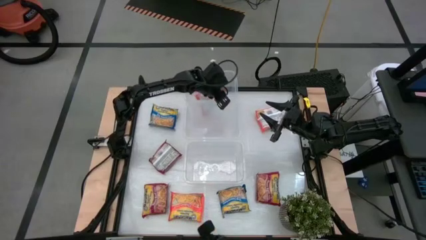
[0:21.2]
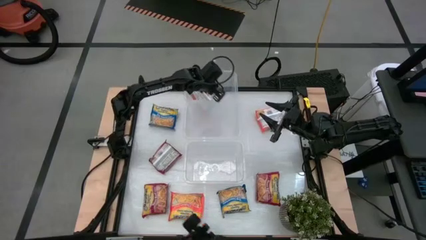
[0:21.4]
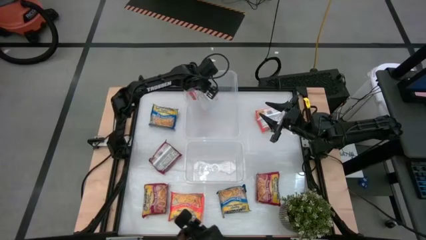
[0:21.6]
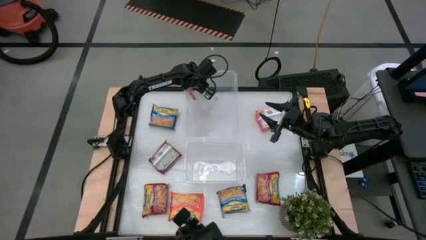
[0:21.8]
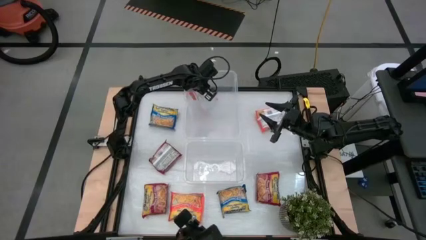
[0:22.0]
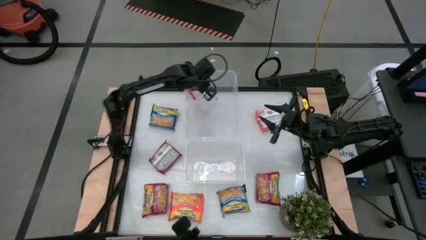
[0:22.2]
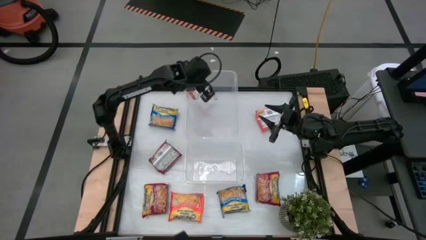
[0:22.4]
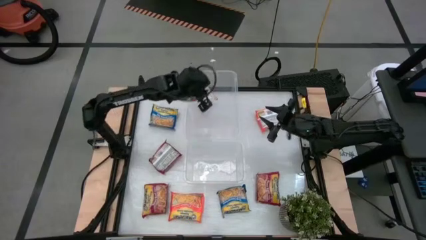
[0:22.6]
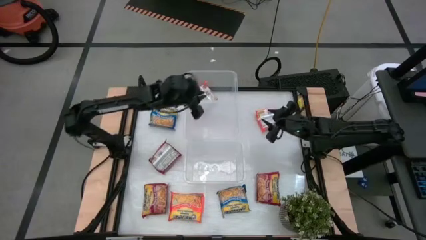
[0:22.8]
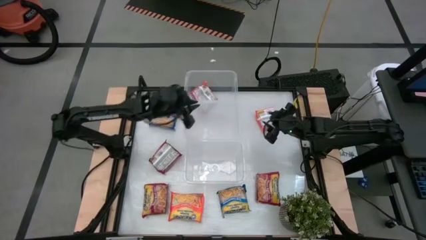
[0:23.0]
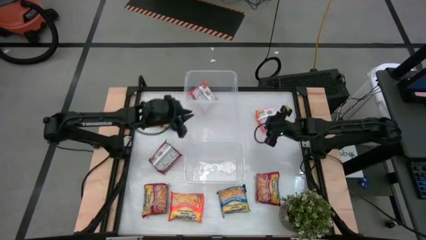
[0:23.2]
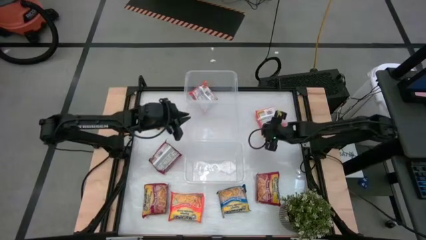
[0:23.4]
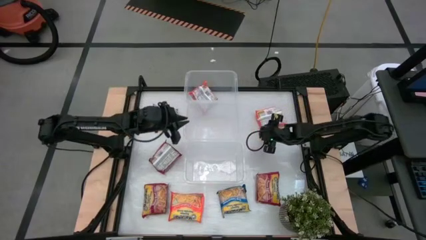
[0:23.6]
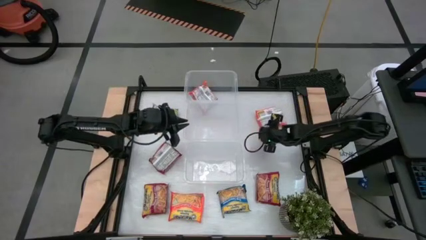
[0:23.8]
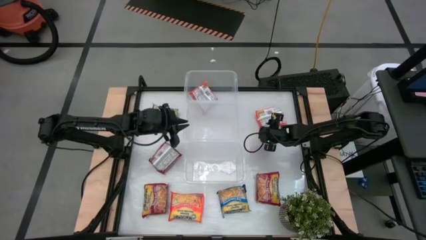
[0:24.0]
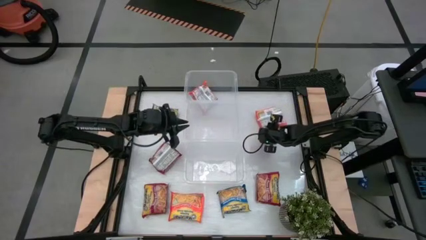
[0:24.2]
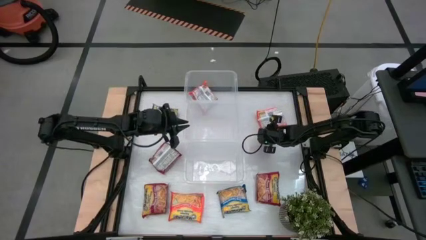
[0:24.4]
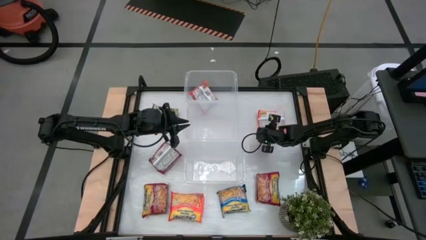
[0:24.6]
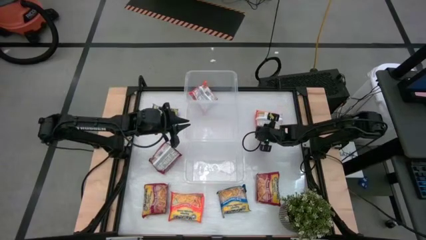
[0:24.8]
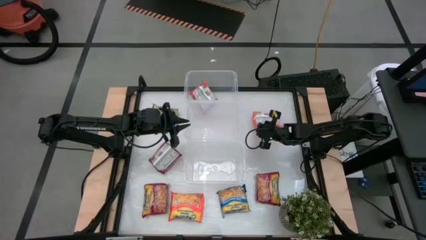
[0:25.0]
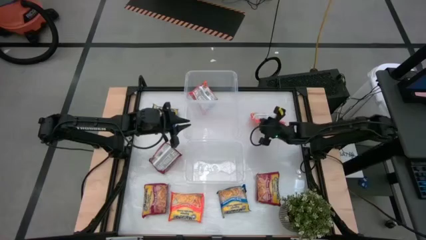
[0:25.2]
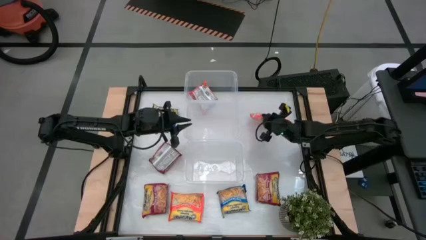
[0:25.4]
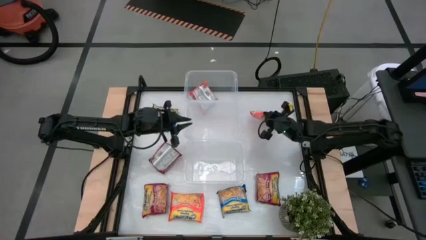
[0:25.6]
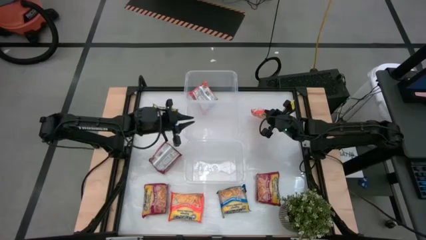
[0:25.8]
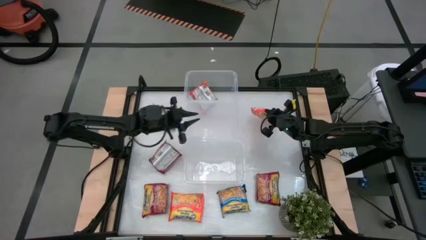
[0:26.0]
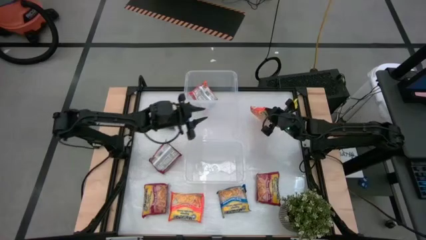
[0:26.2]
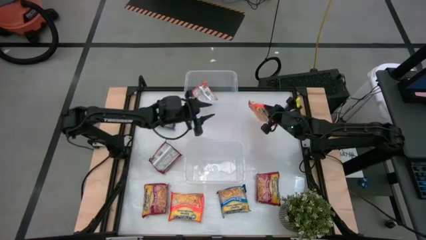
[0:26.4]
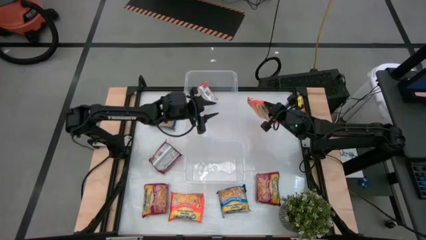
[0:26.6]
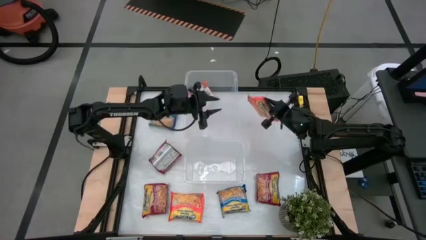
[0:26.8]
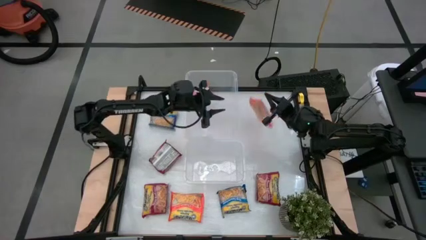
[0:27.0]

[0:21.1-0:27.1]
Task: Sort Maruchan noodles
Put the top orange noodle pack into the top transparent bin

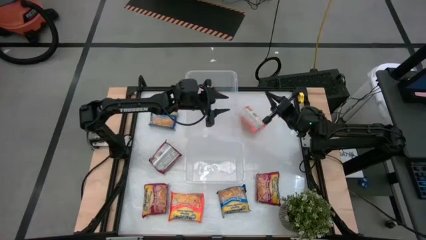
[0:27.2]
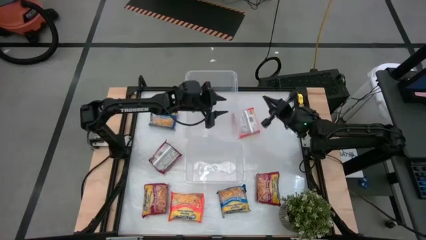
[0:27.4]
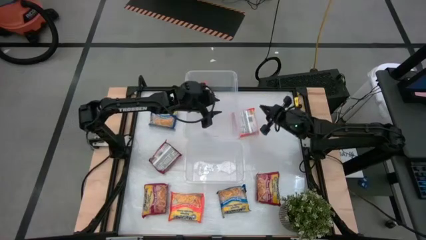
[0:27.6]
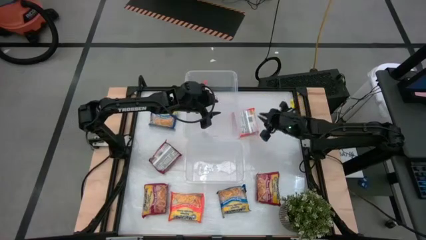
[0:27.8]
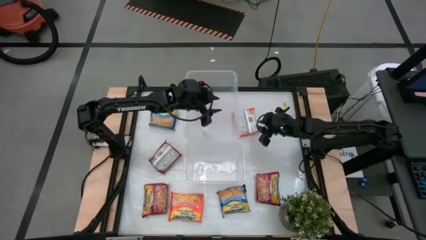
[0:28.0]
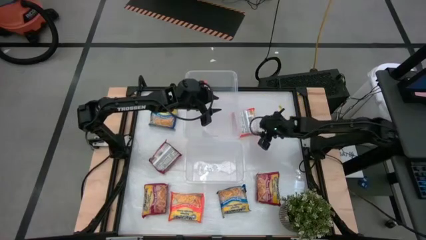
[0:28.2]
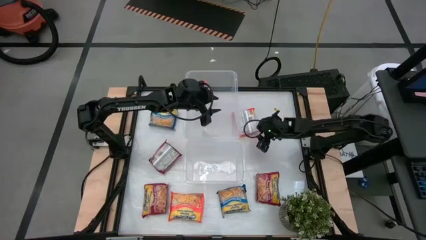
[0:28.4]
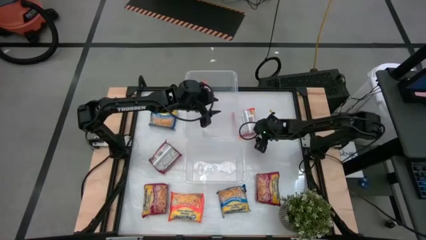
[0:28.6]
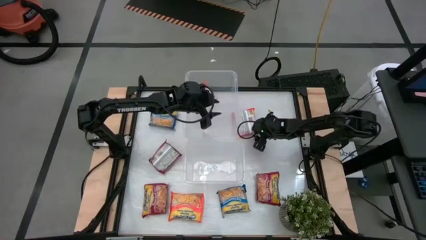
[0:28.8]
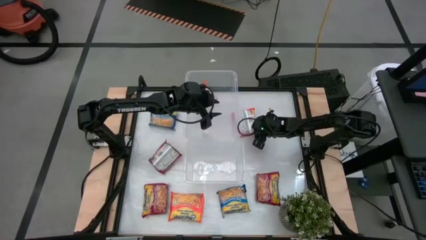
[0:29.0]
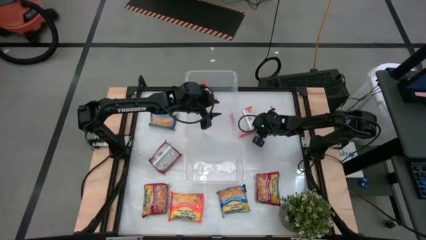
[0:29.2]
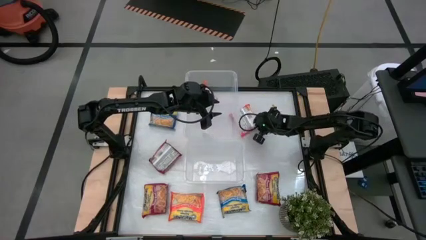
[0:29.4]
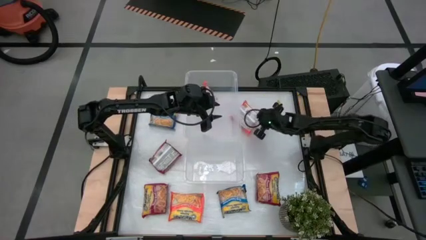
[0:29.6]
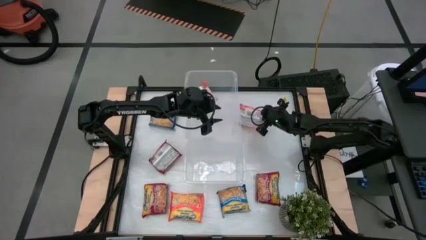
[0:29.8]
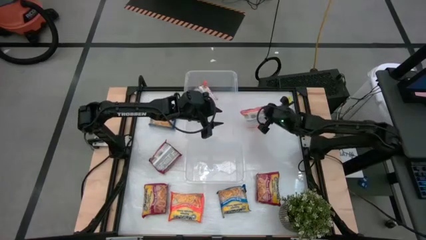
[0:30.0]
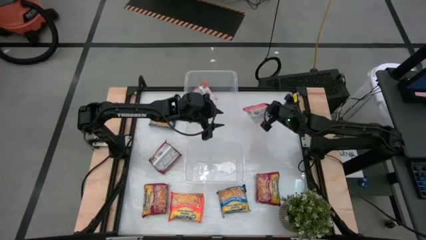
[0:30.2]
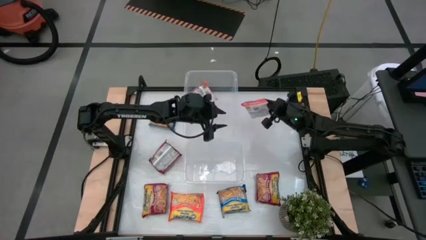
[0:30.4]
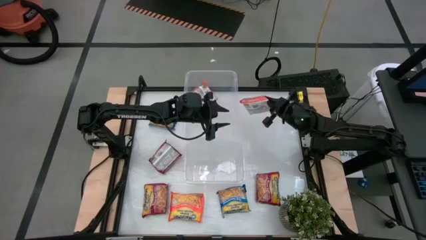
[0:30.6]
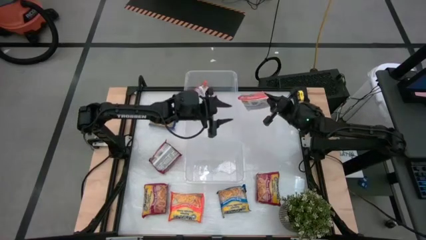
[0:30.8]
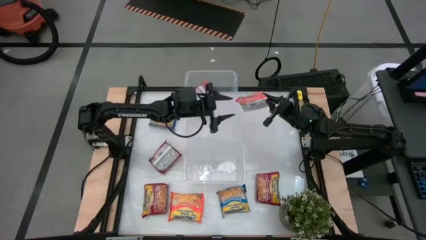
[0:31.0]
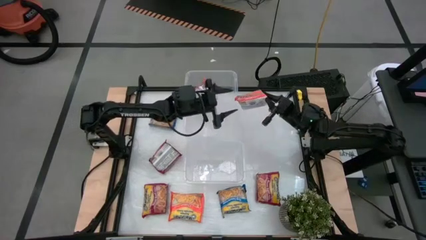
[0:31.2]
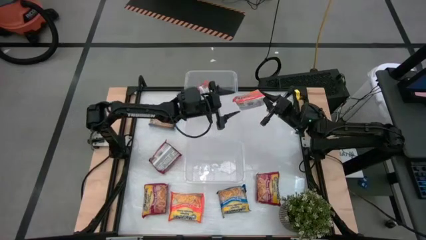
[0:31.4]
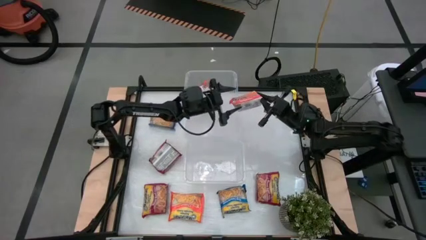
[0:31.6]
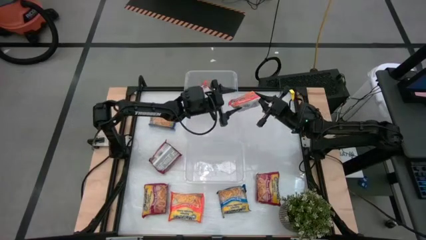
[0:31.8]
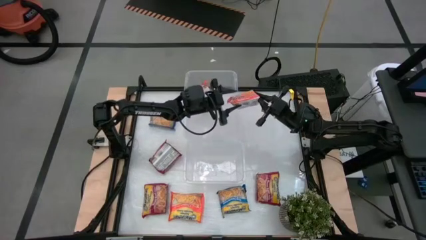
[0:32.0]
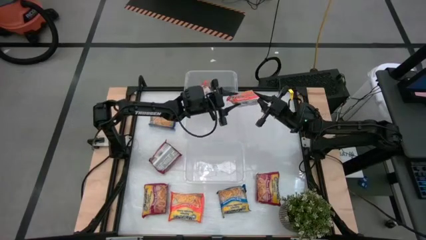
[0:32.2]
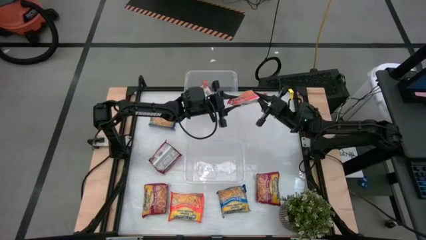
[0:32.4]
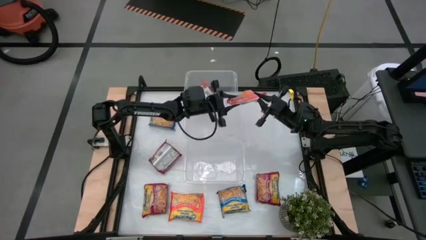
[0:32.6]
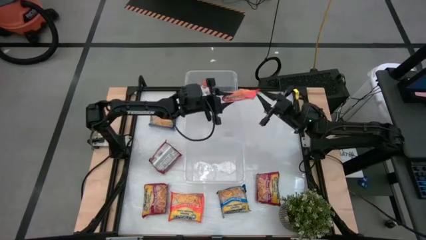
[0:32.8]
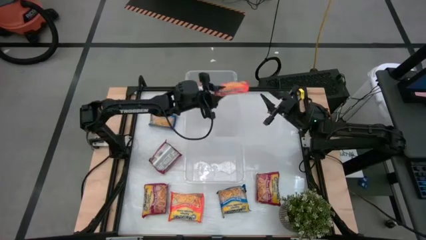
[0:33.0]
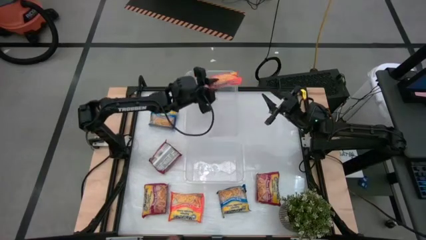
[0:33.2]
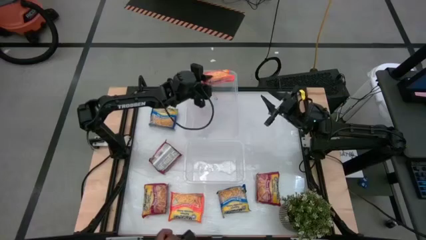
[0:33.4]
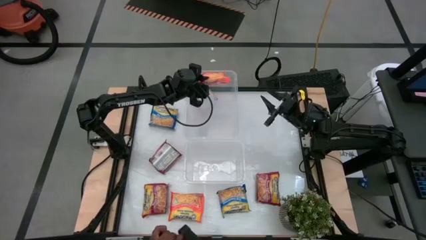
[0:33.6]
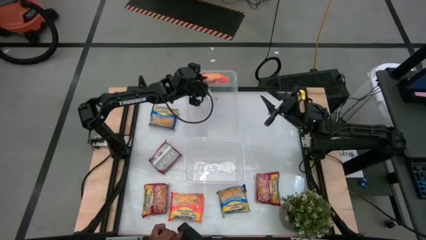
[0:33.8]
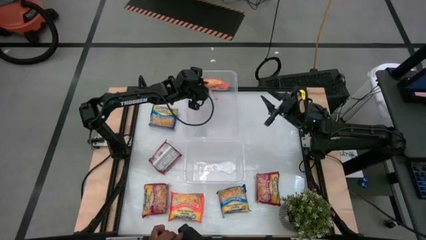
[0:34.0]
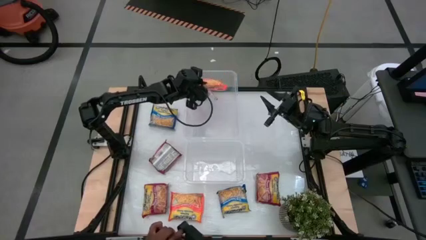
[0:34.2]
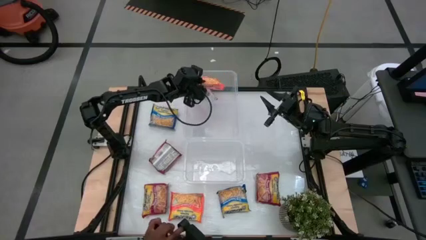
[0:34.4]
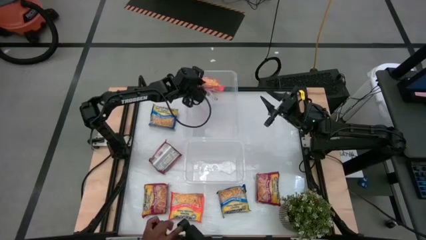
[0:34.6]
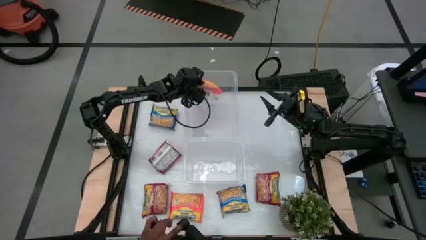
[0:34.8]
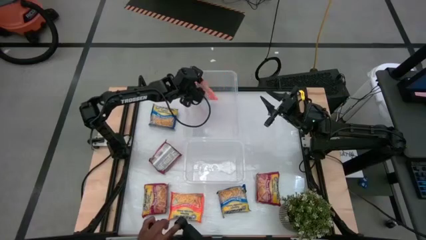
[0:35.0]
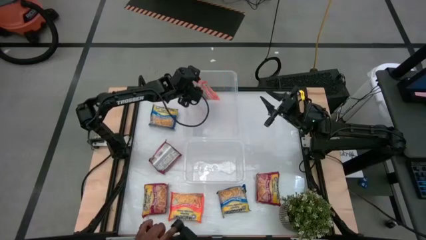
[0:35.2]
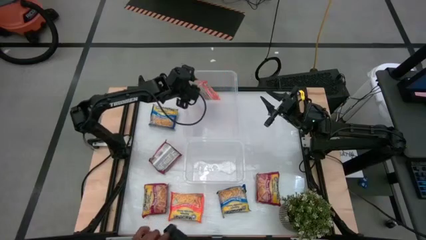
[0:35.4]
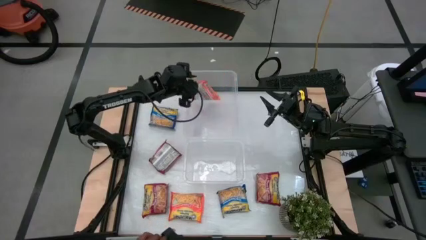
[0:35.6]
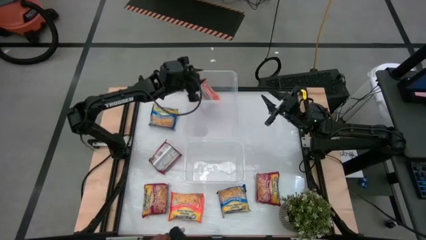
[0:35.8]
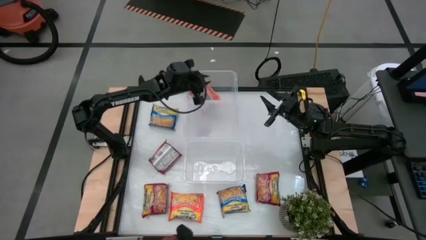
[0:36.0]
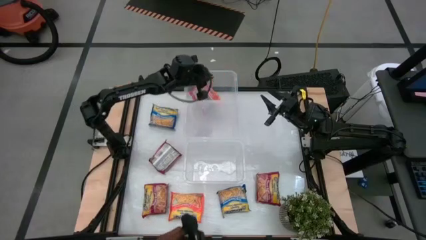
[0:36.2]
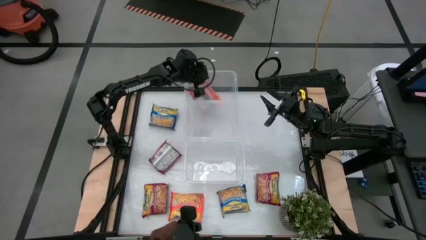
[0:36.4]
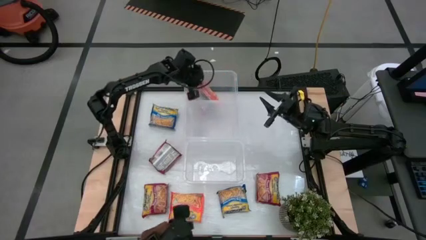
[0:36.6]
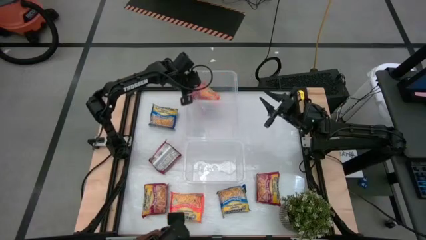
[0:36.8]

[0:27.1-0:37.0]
Put the top orange noodle pack into the top transparent bin
